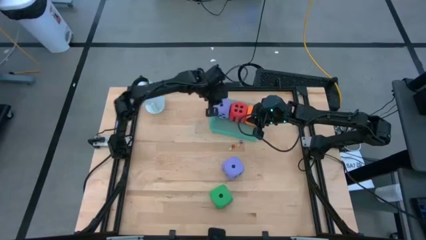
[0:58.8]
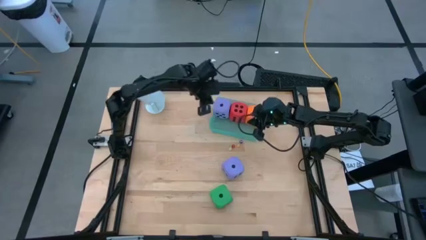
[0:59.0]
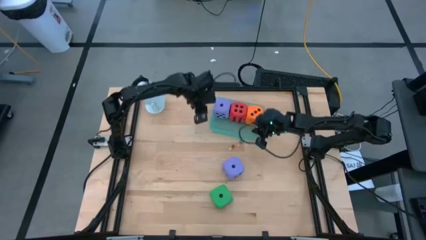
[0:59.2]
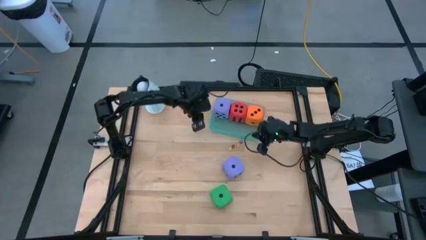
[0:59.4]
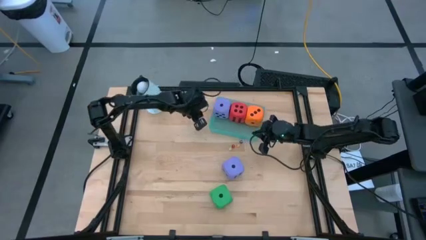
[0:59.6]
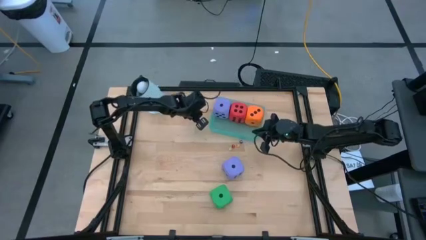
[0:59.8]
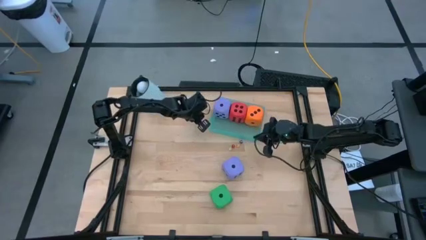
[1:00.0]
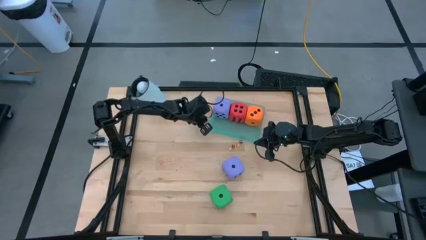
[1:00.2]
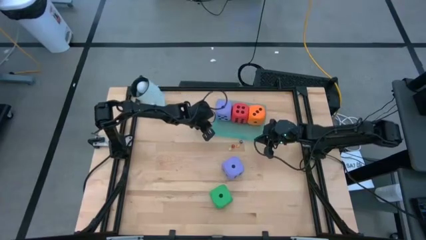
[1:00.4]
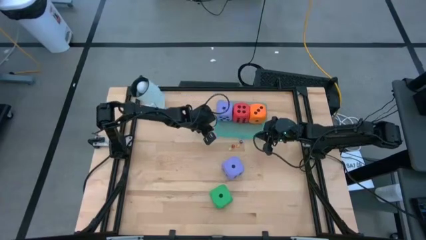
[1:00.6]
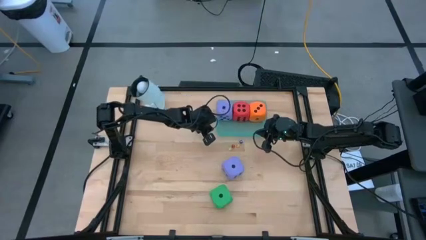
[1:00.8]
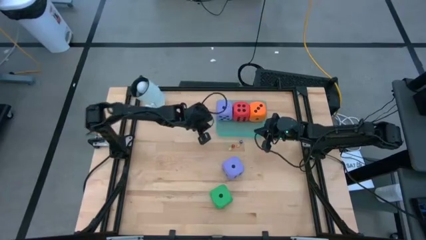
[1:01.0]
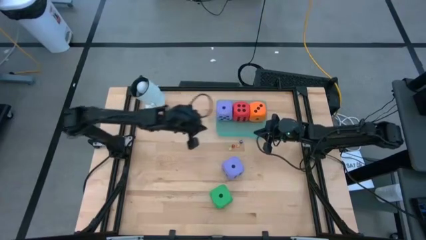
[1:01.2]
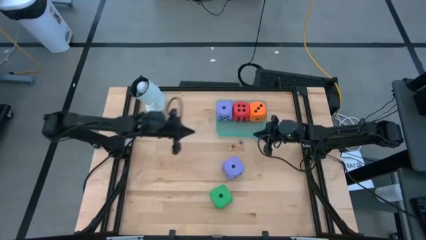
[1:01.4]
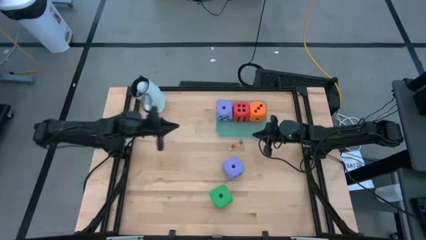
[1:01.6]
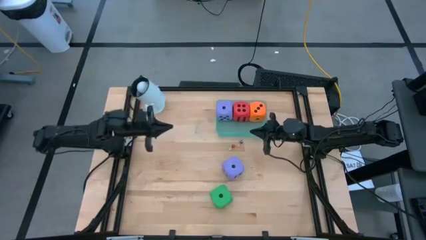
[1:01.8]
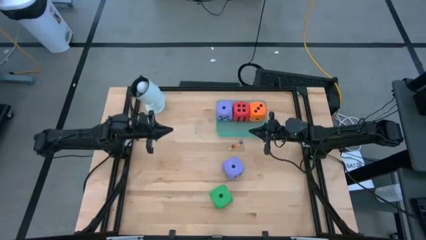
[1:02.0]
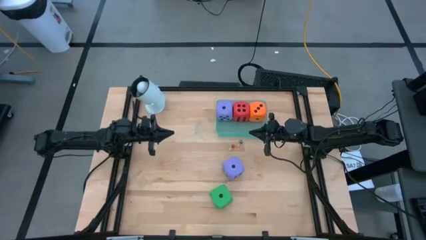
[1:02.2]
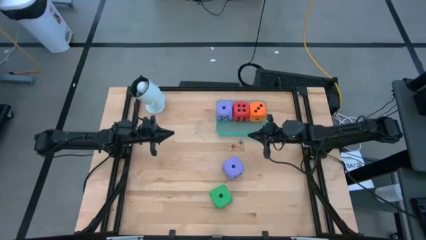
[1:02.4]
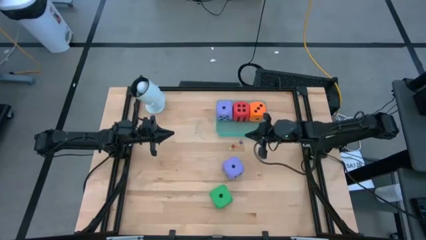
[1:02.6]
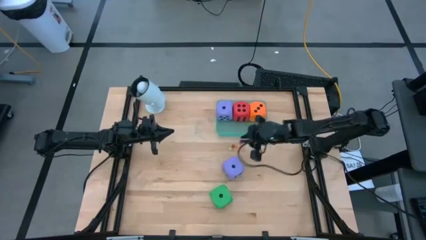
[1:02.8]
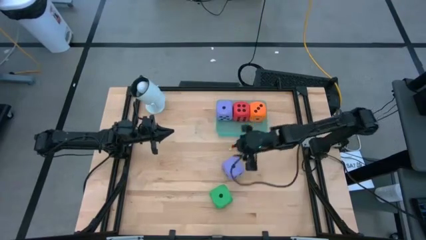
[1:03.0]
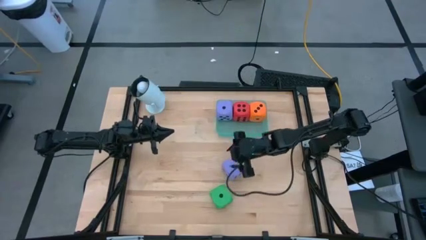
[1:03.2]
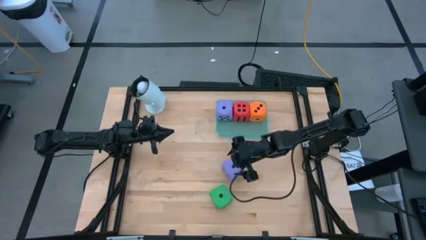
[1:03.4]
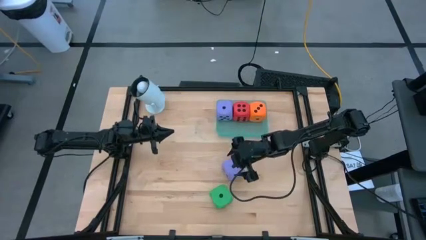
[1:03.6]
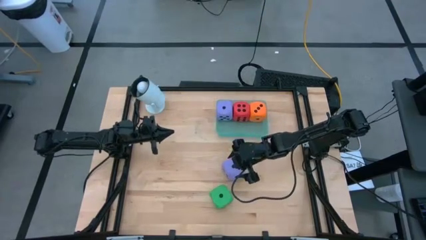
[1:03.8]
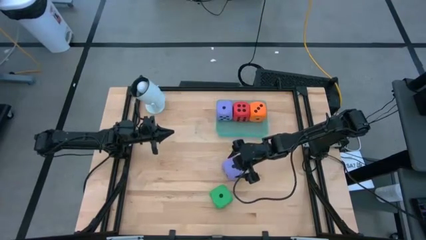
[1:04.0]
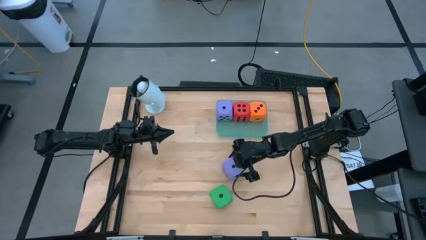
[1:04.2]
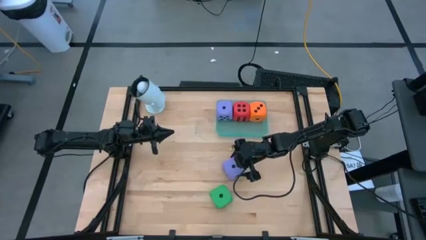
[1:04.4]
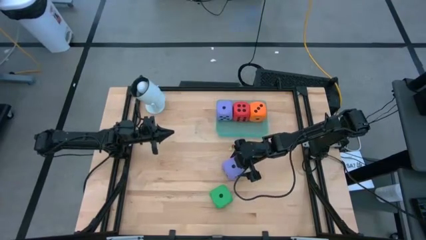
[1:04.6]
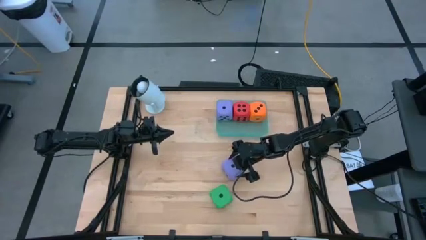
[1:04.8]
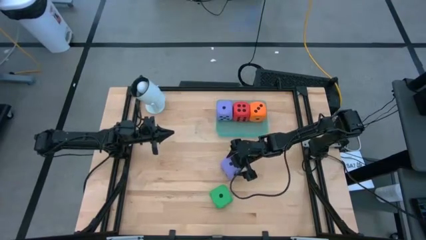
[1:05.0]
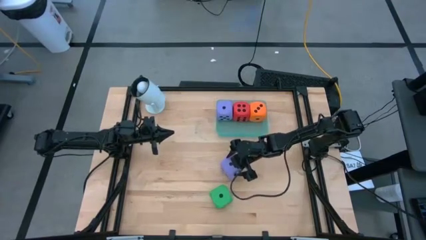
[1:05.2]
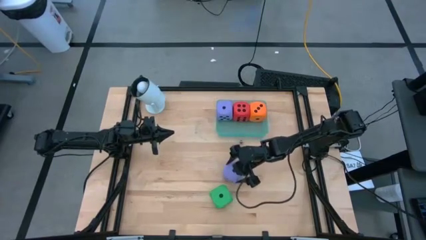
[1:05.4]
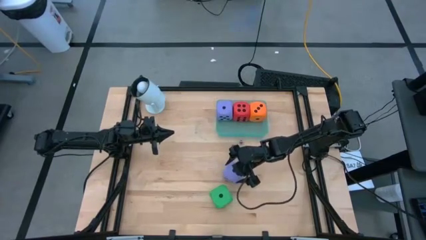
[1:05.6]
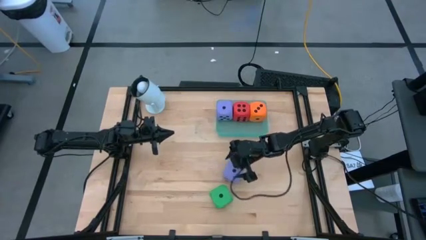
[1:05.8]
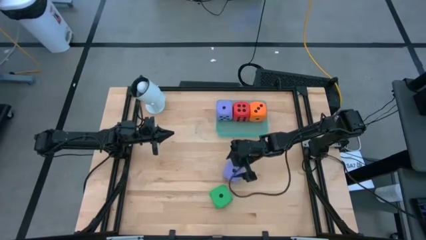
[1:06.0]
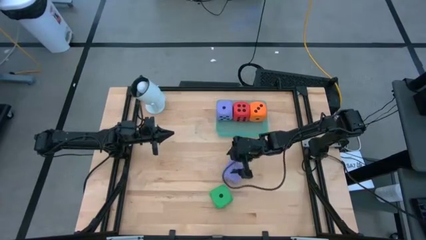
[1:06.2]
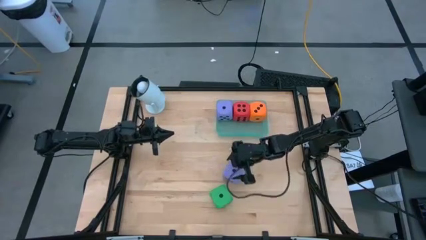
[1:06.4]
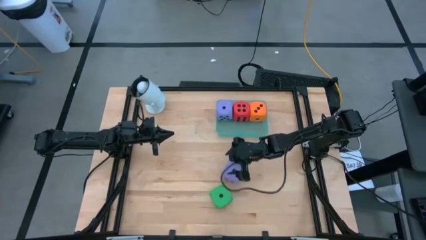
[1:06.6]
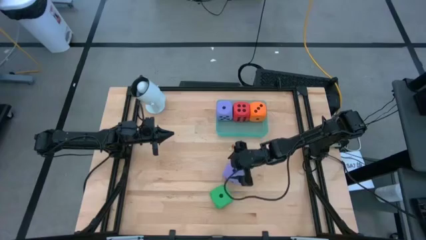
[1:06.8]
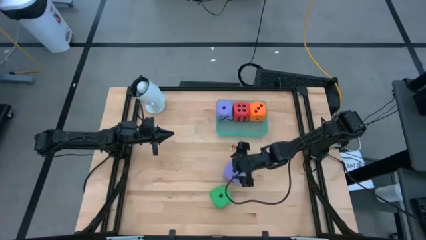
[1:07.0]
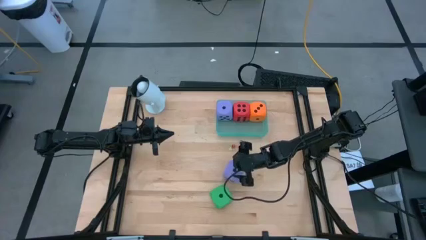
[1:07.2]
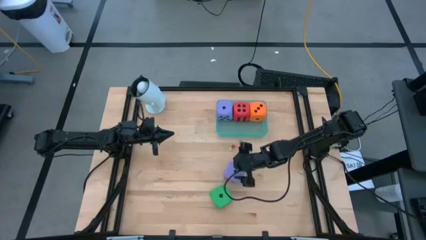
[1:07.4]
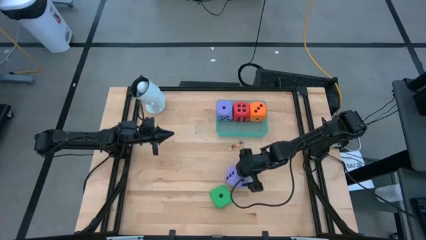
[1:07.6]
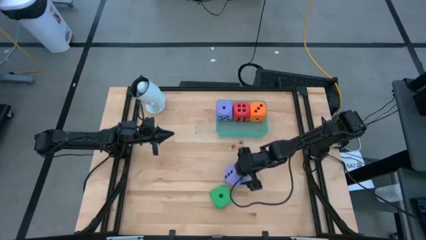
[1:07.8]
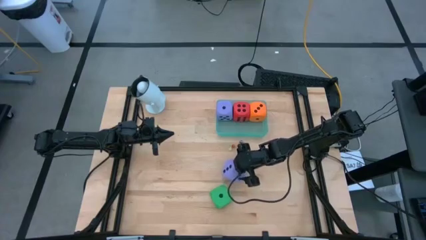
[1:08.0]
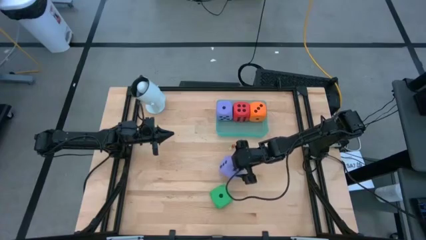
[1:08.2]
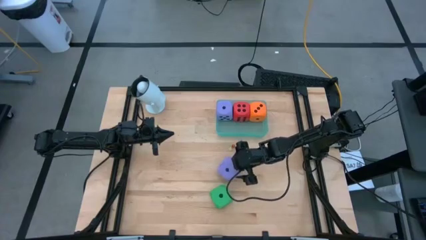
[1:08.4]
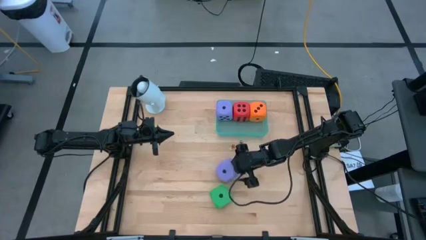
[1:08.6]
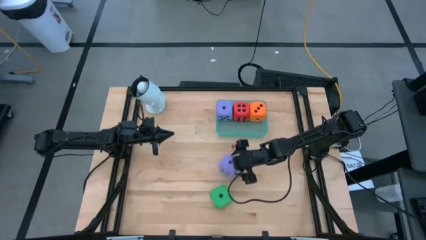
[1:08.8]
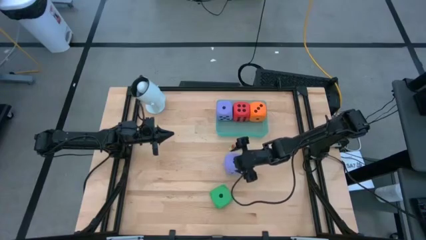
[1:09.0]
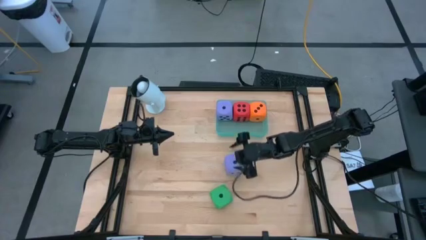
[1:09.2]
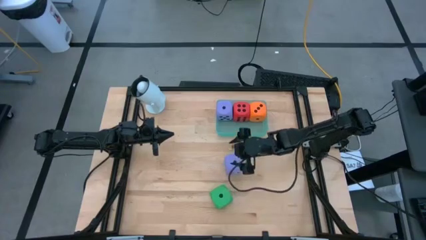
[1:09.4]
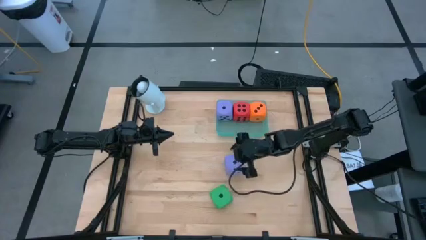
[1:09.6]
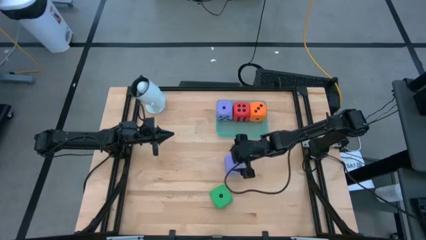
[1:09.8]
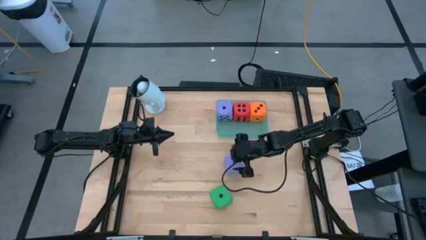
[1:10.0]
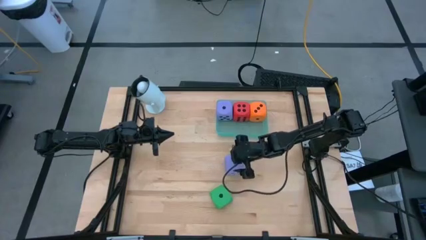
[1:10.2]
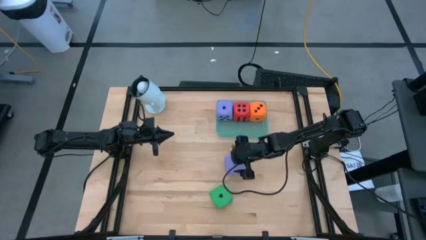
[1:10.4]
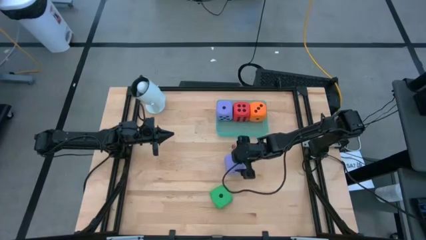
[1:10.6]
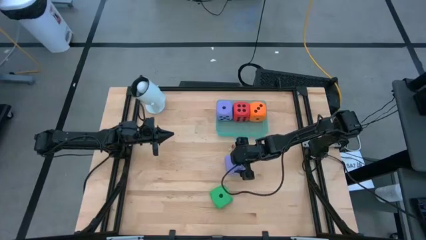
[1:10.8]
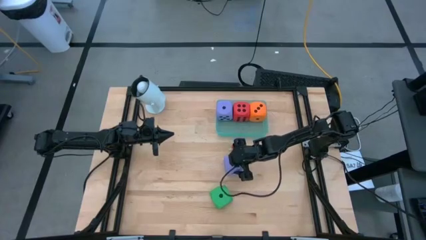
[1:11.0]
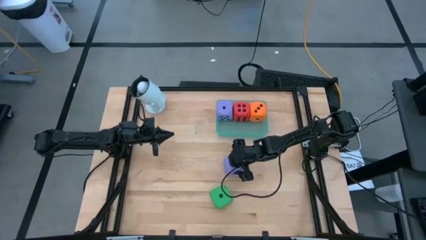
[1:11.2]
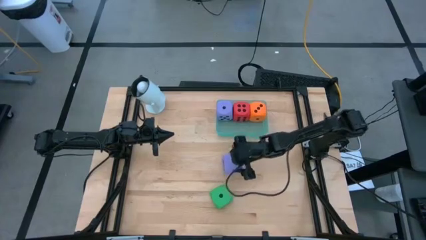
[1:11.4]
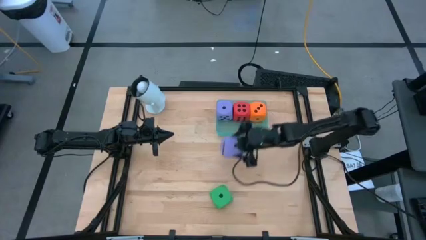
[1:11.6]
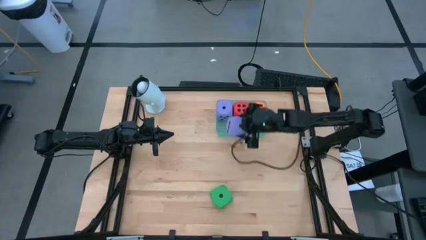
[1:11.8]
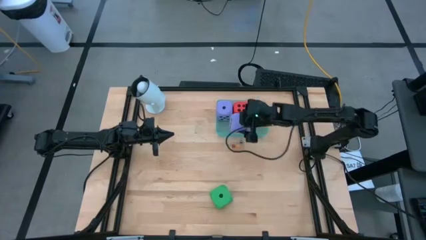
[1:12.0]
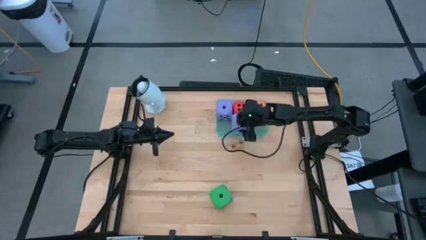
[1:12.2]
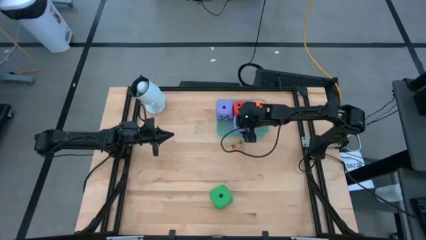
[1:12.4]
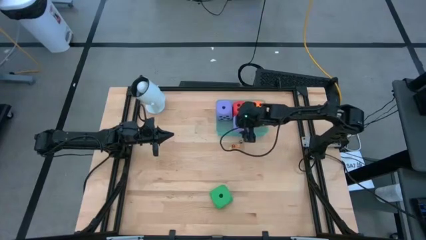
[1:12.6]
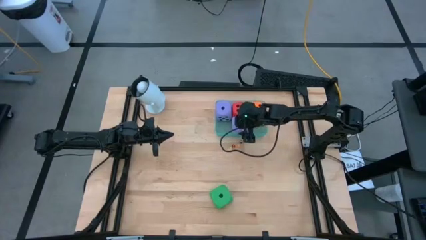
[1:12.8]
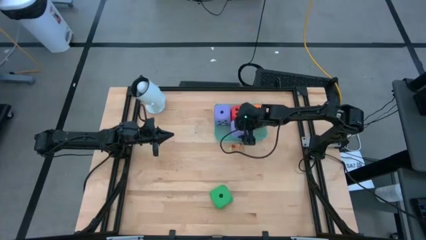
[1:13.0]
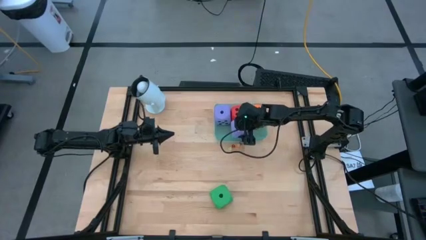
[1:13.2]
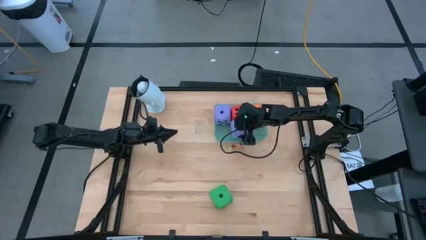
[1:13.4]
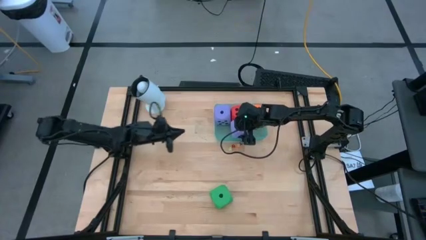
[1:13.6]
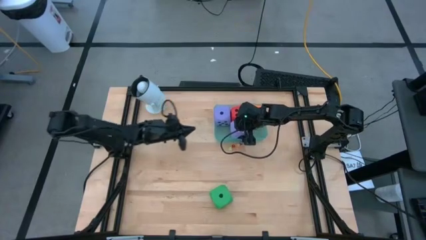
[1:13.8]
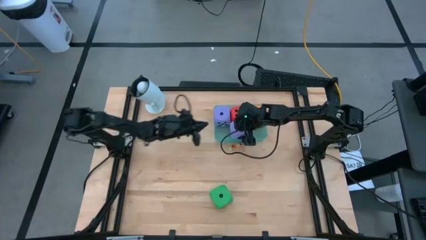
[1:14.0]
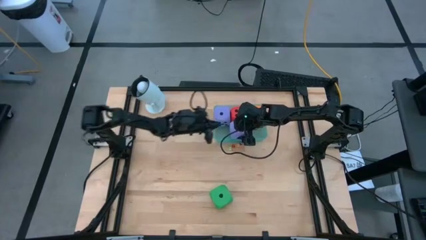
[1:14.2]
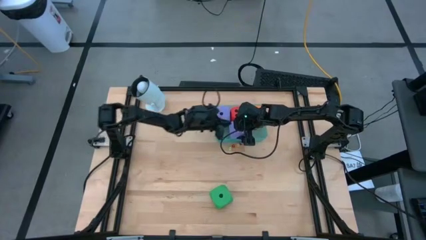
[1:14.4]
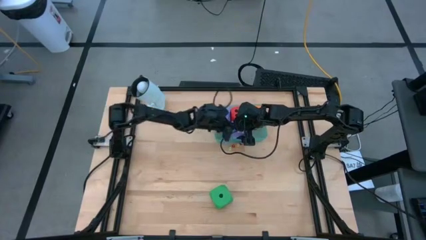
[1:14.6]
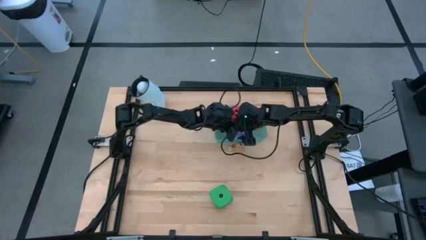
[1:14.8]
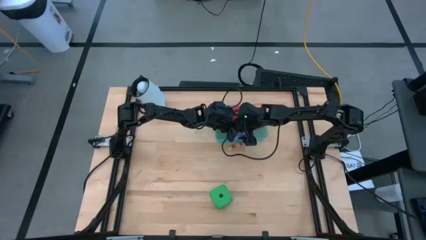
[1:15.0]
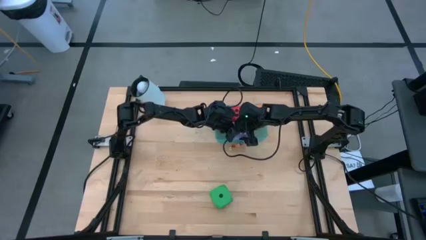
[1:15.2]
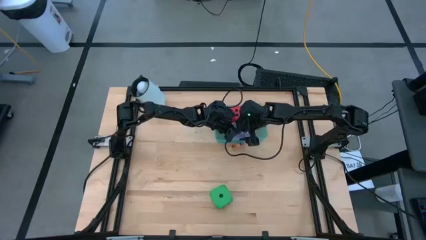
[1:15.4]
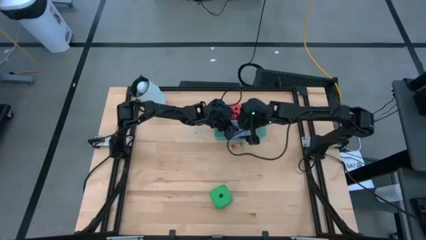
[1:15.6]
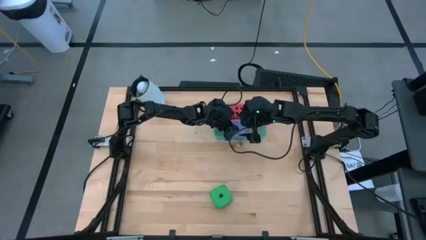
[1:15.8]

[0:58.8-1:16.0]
Task: Pick & Place Dice
Put the big violet dice into the transparent blue bin
